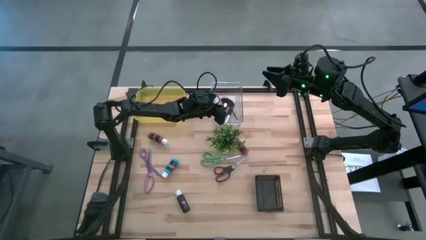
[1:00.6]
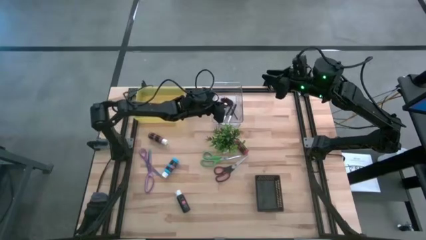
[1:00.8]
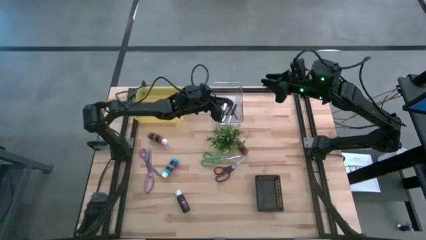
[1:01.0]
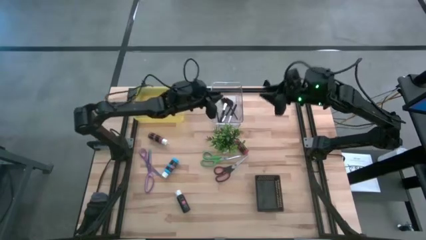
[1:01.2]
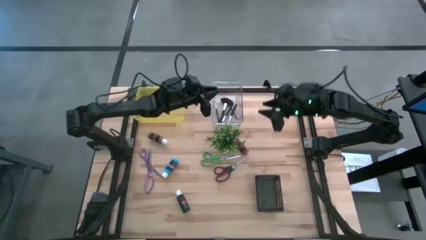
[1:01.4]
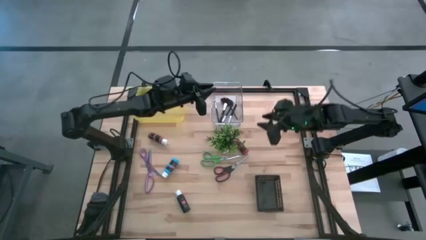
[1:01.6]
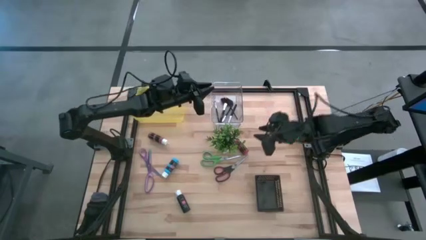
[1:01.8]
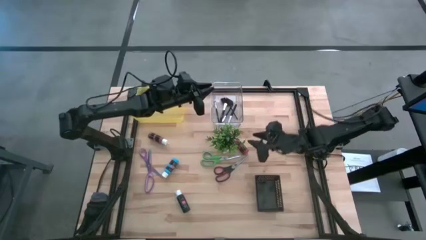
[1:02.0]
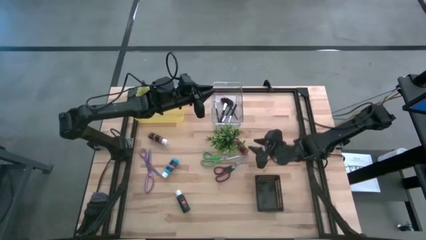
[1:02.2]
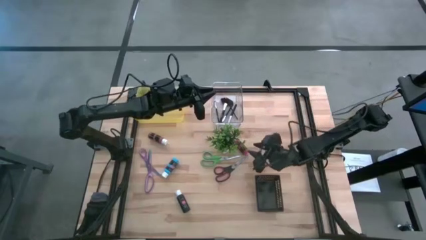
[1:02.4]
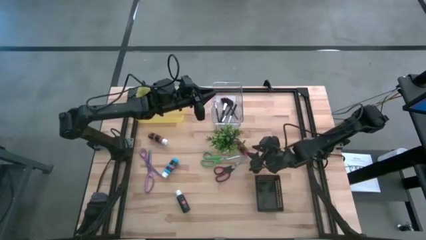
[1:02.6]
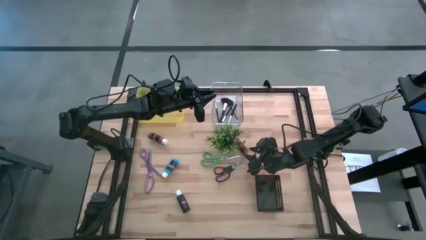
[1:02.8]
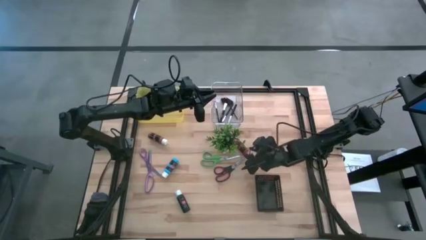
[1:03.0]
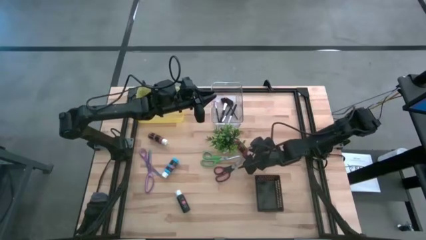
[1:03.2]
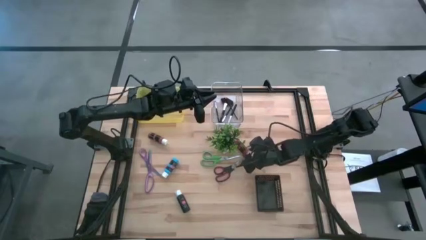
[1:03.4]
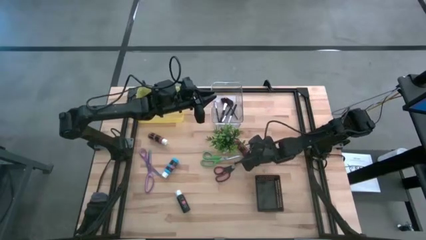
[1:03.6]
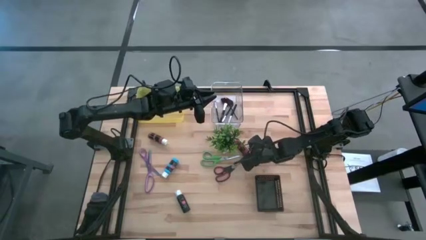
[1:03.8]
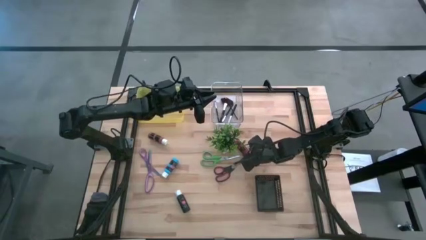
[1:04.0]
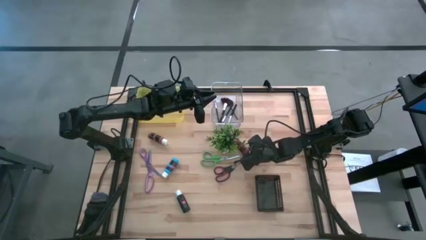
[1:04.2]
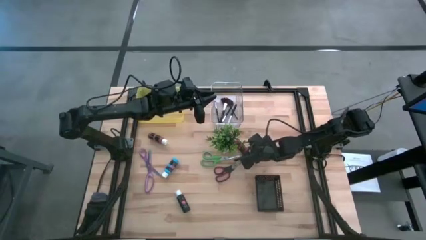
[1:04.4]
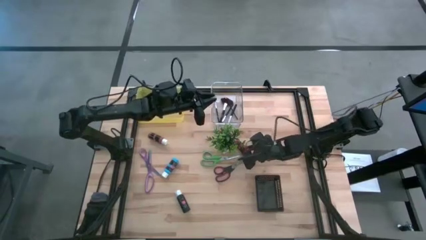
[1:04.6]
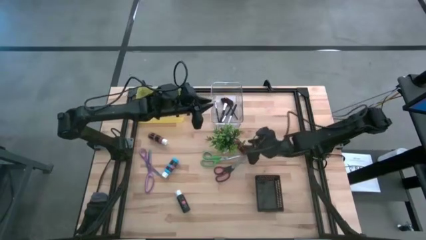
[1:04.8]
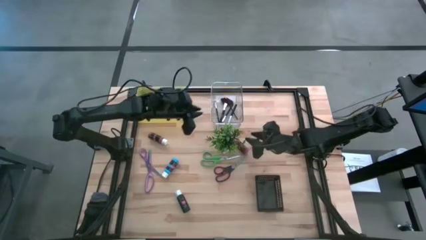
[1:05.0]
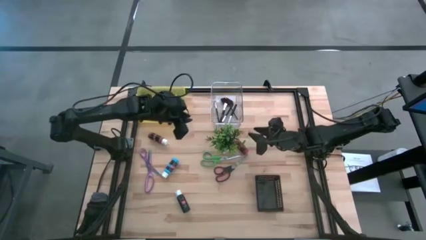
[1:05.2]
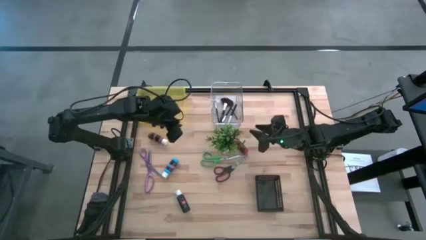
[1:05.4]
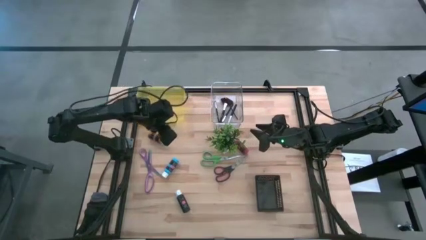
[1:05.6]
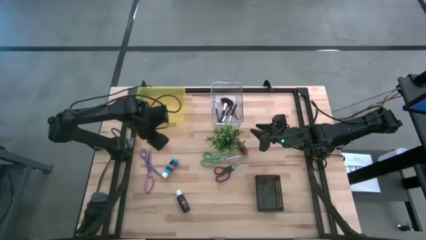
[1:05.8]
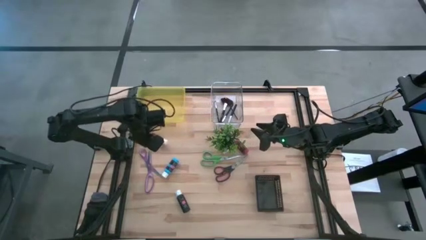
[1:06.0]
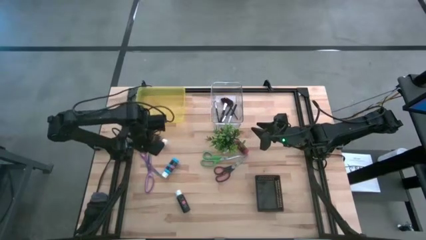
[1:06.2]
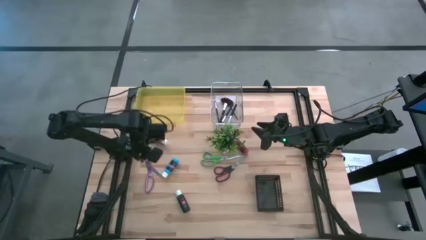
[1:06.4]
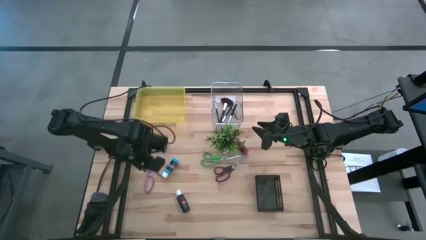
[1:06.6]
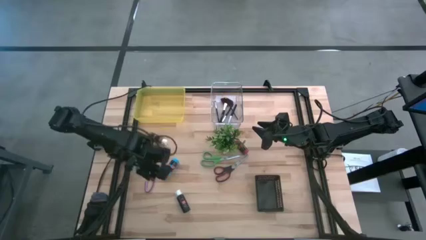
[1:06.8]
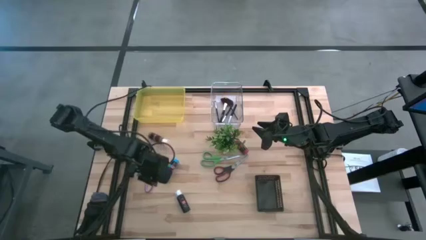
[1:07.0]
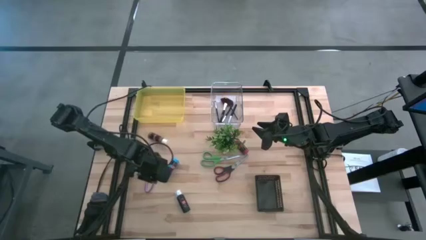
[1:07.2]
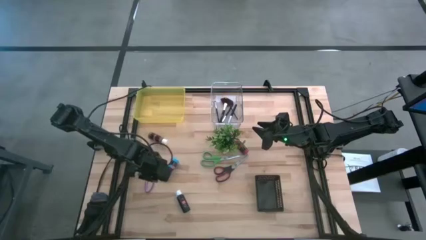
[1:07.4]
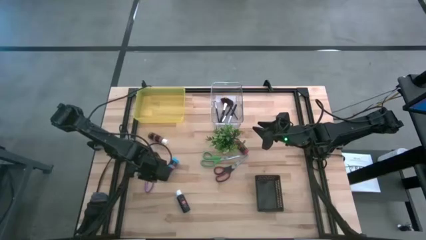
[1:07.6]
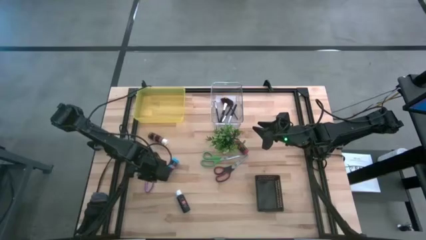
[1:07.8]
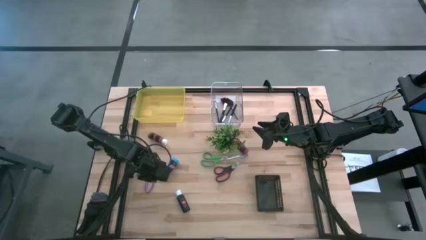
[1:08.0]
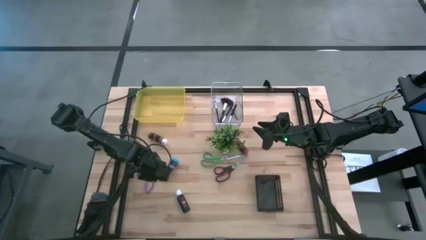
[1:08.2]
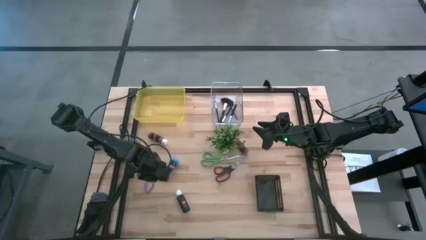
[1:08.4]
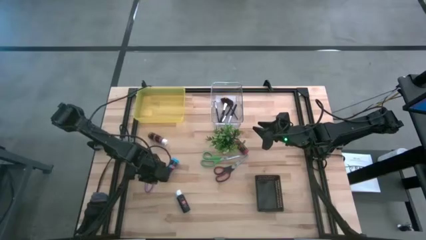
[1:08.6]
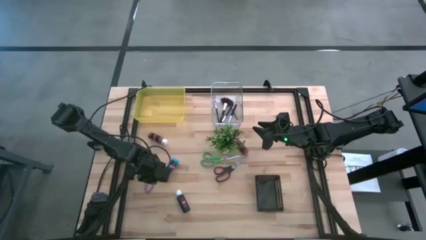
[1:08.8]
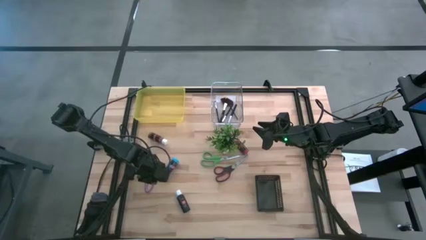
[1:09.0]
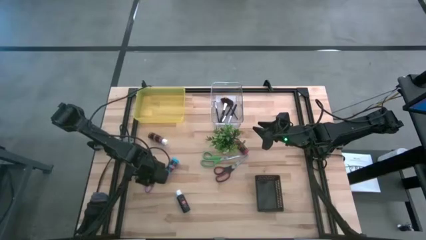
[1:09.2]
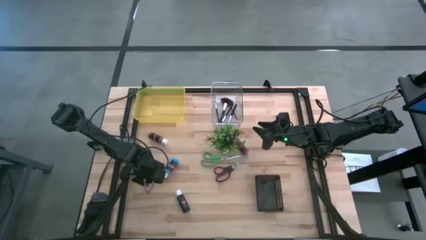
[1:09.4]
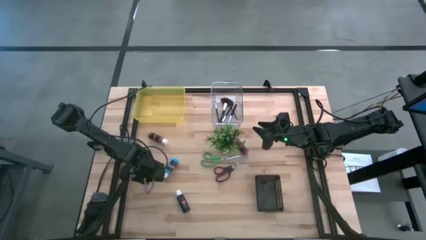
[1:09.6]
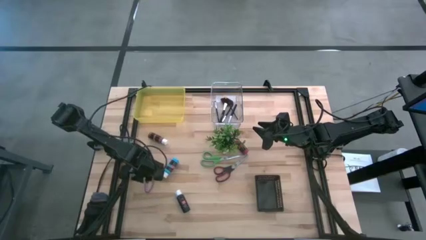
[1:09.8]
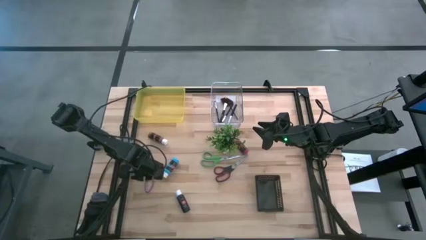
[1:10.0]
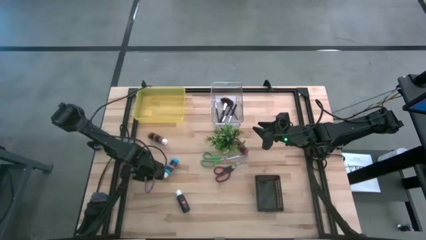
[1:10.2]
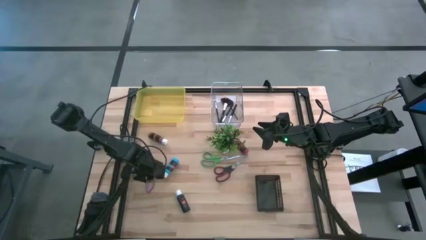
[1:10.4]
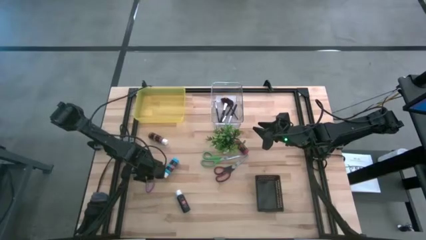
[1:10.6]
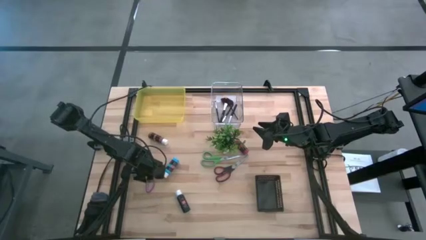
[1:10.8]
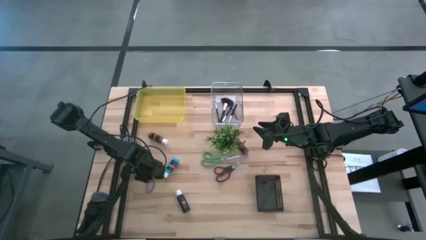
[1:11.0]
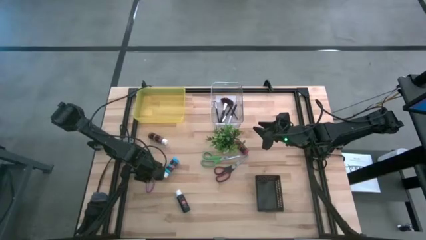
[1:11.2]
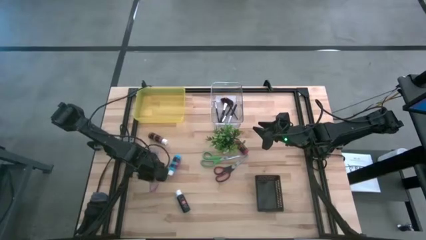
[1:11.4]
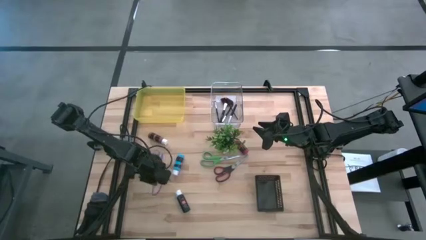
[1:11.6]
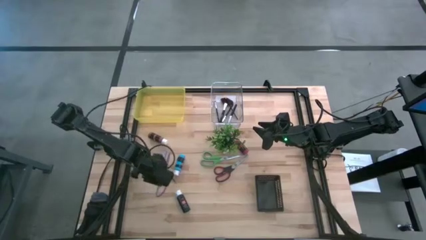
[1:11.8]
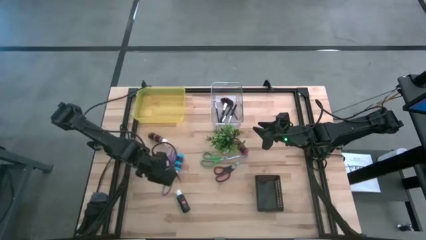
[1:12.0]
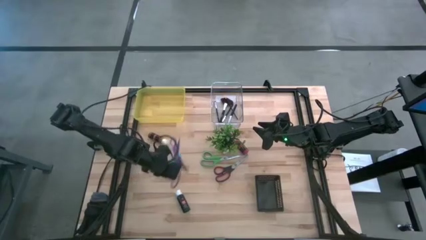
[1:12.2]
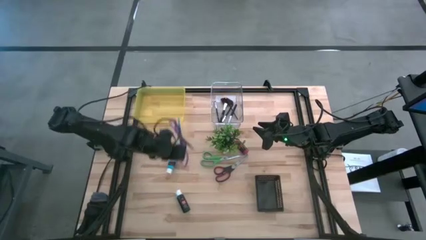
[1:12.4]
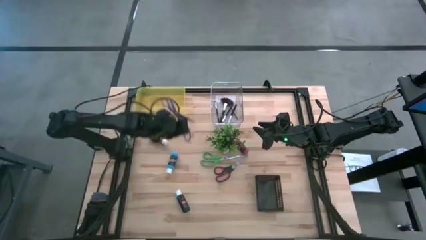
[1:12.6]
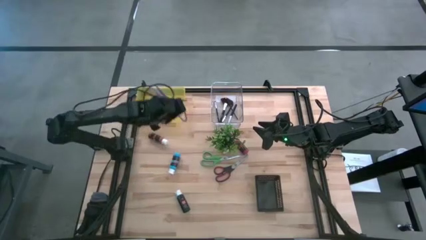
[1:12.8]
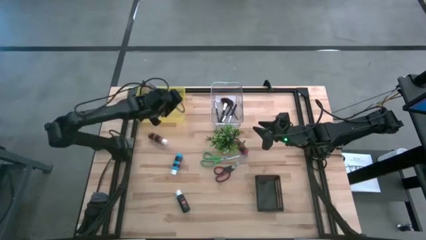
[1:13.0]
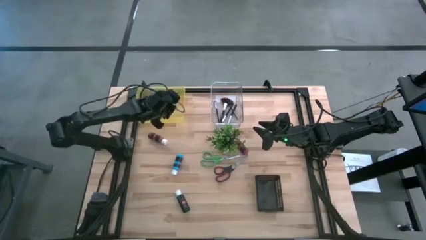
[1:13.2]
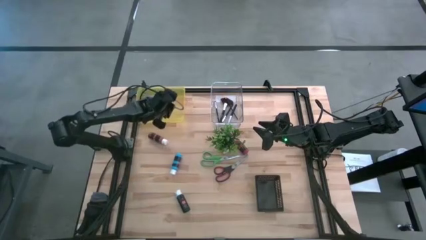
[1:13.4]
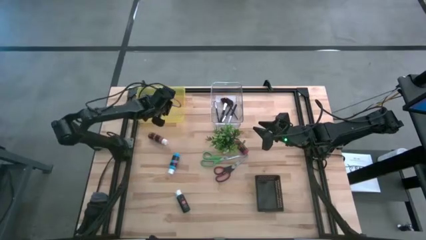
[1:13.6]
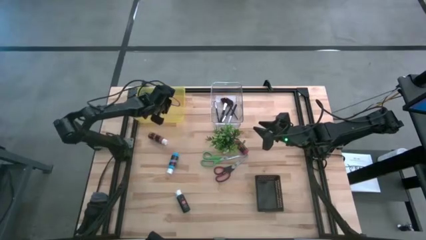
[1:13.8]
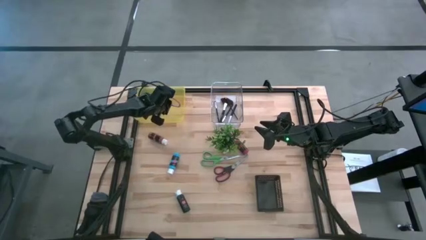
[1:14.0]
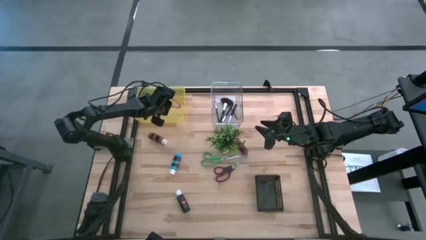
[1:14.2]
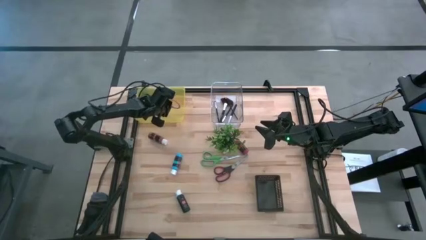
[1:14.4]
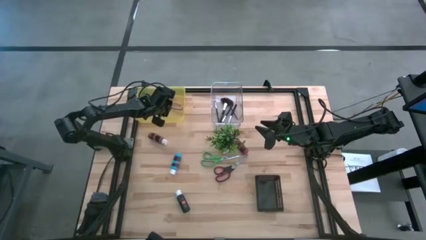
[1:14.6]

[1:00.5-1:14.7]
Task: Pick & Place Paint Supplies
Put the purple scissors into the yellow bin
